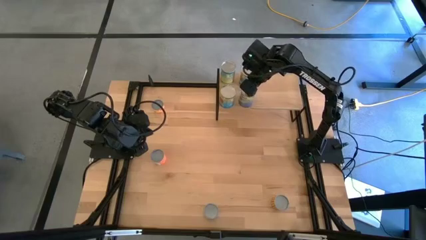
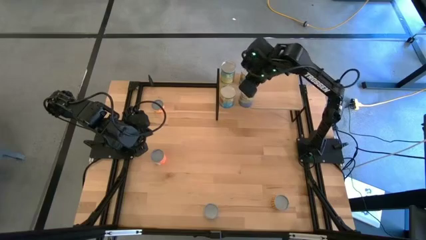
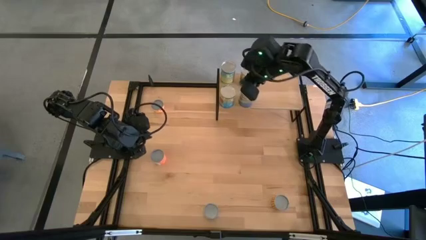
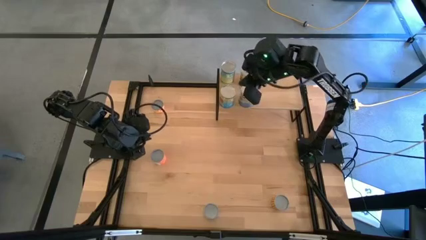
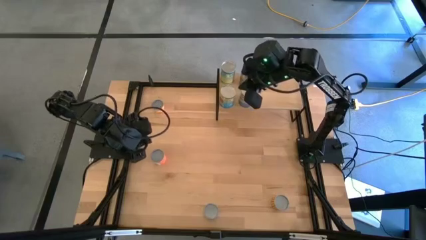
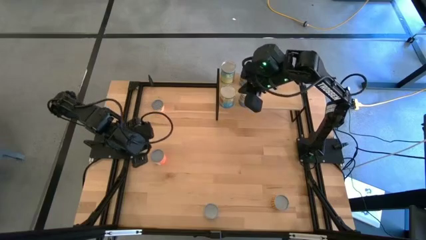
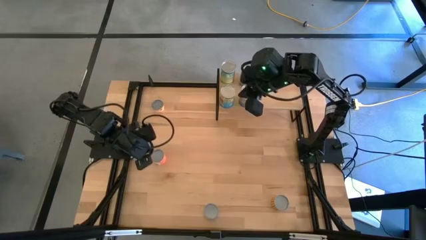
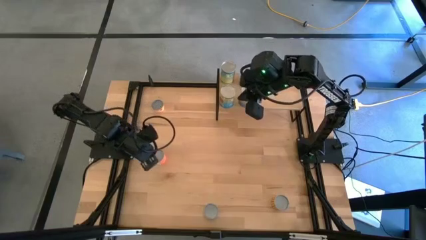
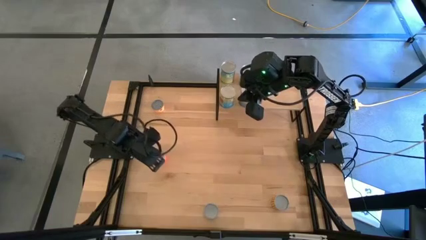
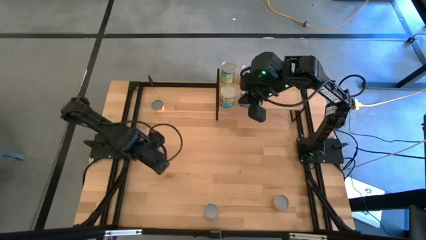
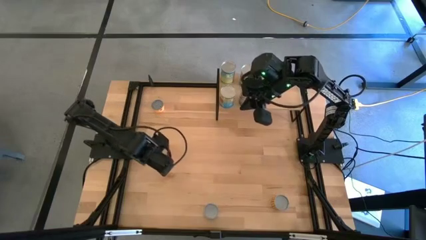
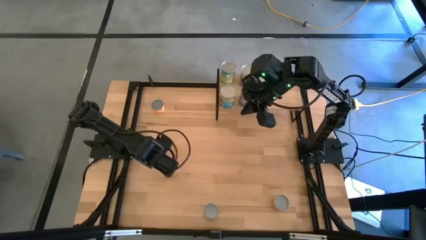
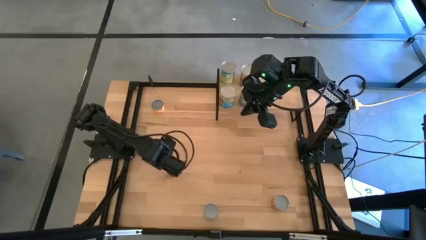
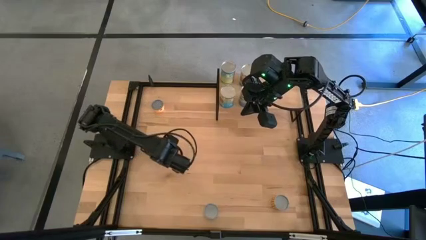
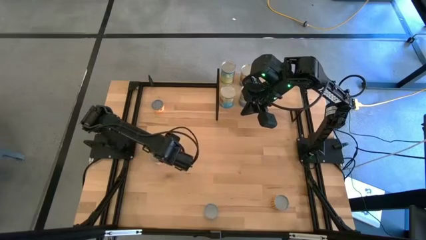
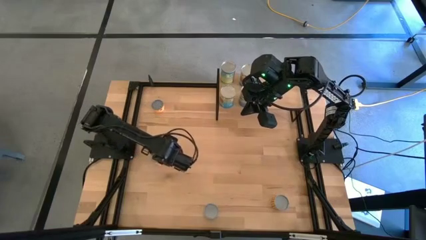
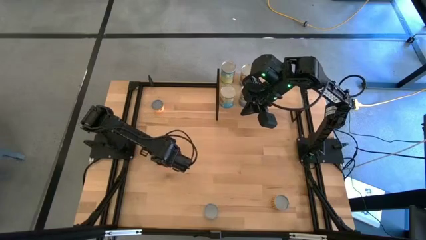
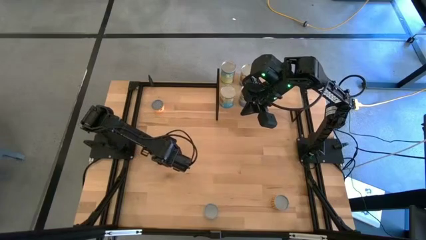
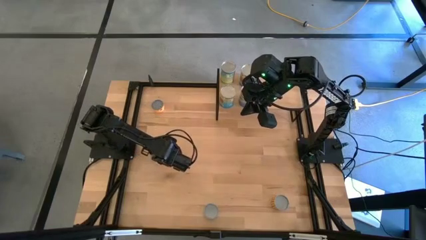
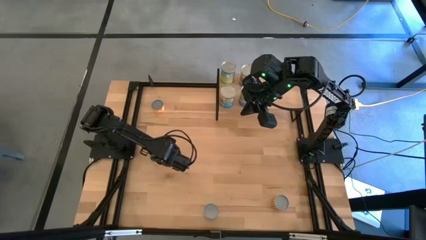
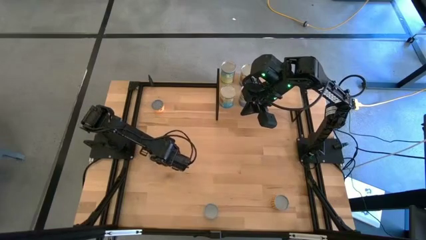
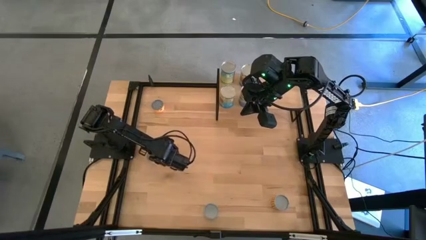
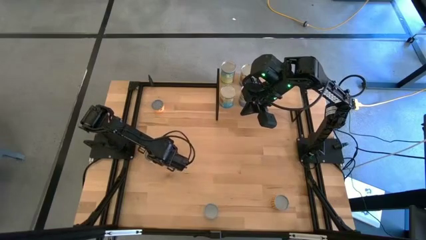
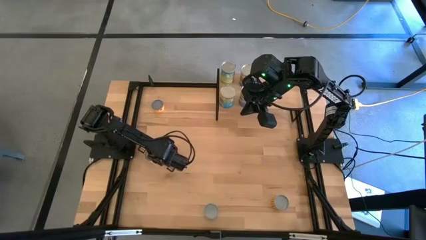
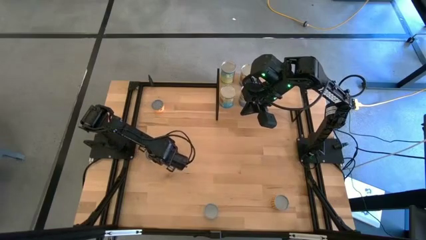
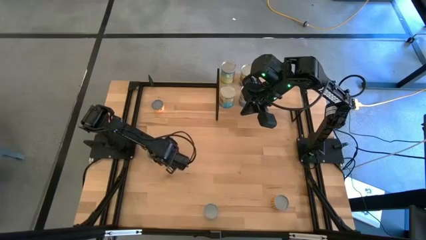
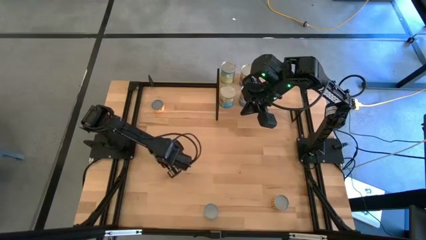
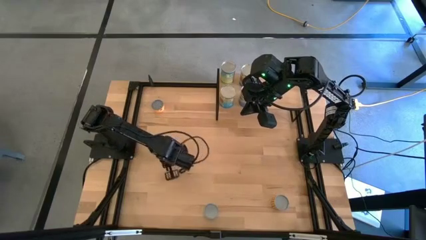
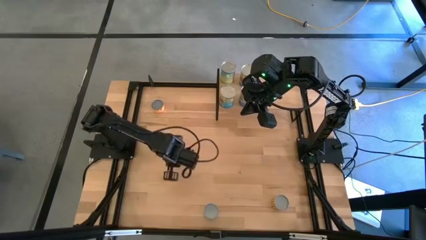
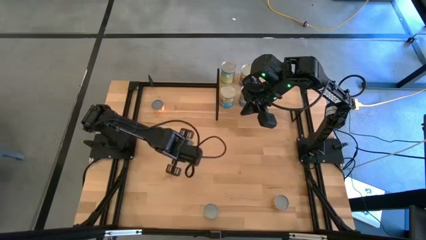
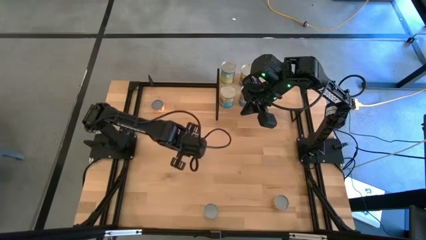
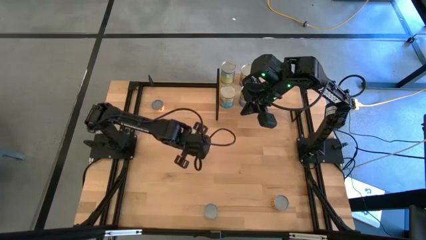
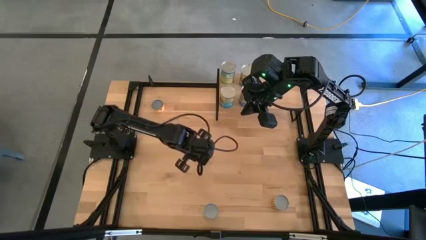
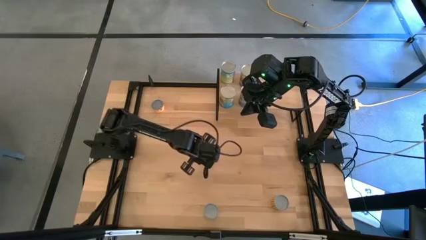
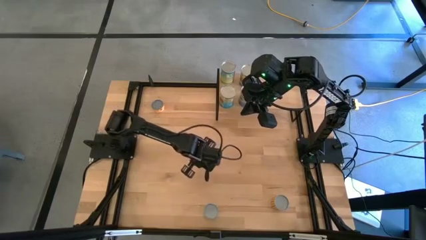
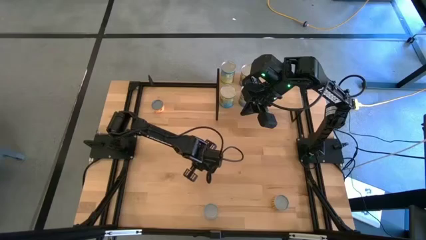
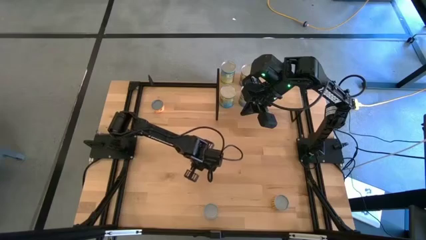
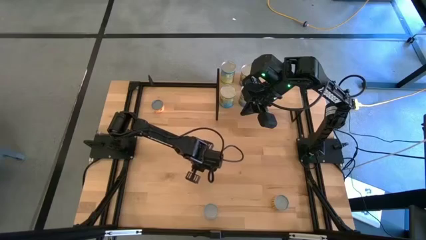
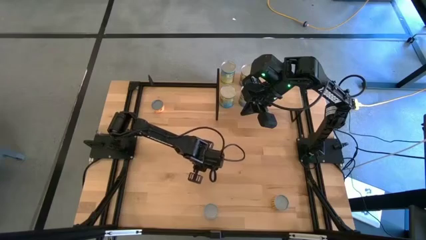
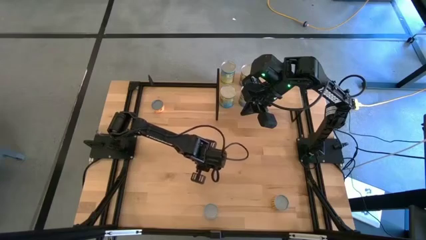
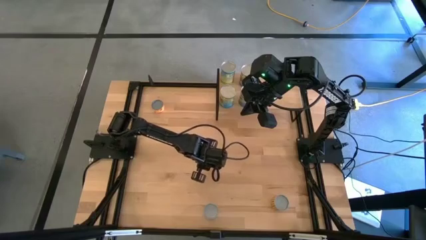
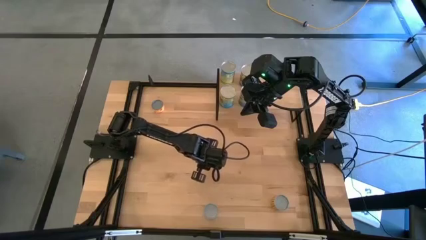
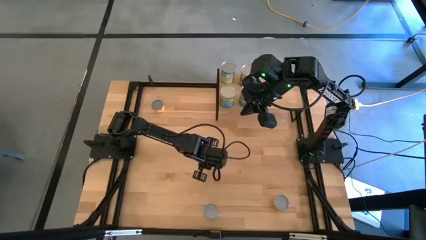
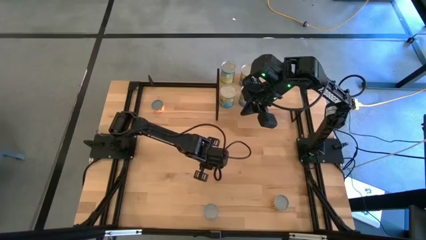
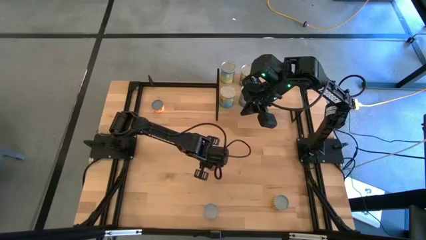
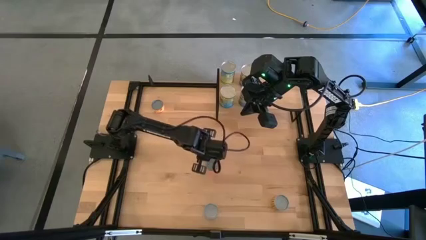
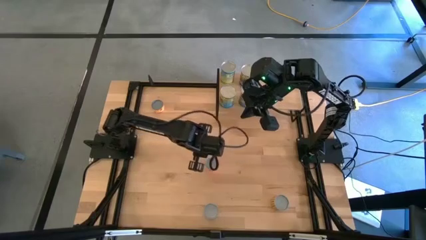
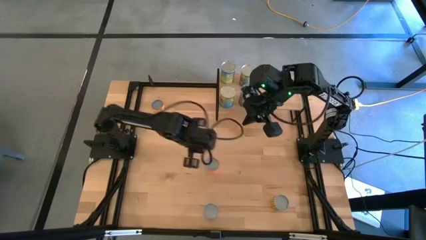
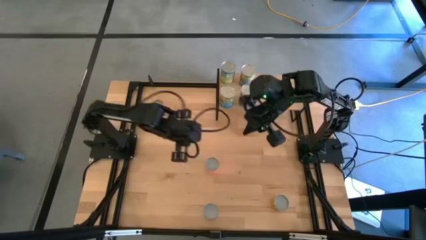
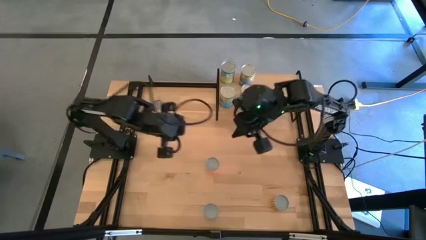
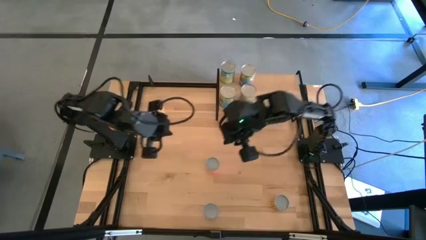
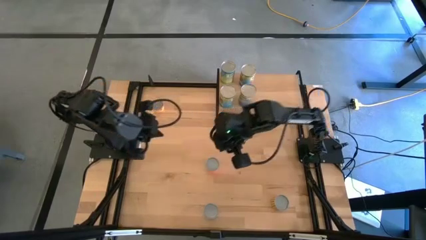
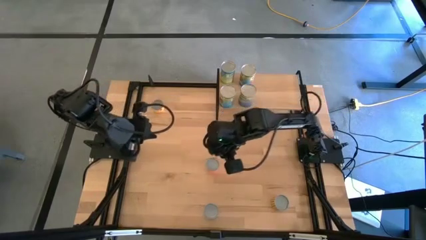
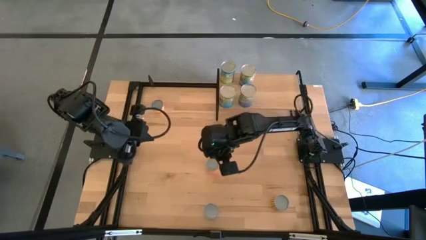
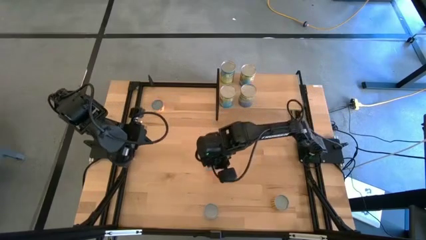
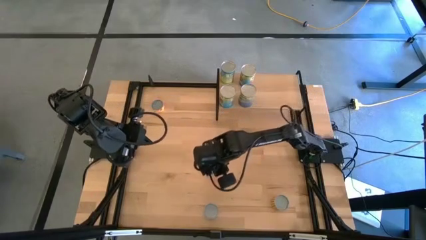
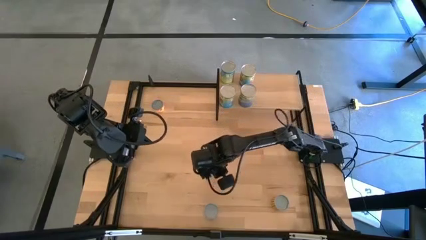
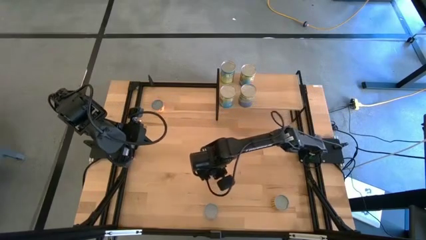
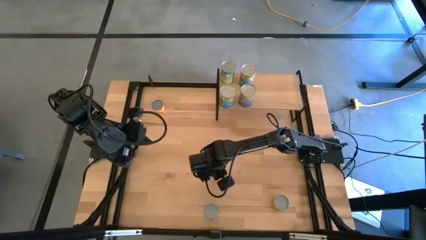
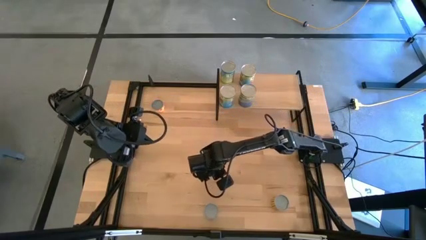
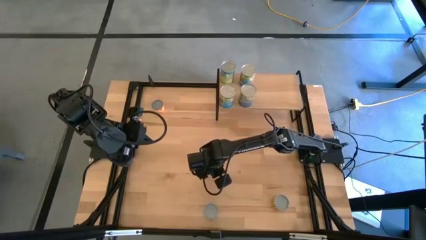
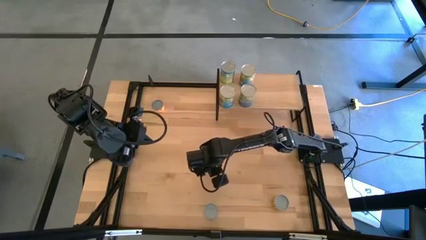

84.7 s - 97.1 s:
Task: Pick and place cans onto a shelf
Put the canned saucy meatballs on the shelf
